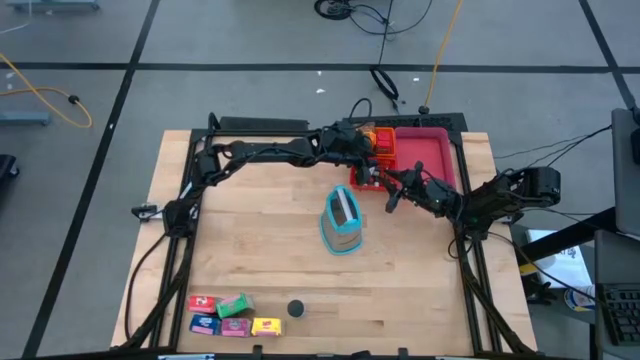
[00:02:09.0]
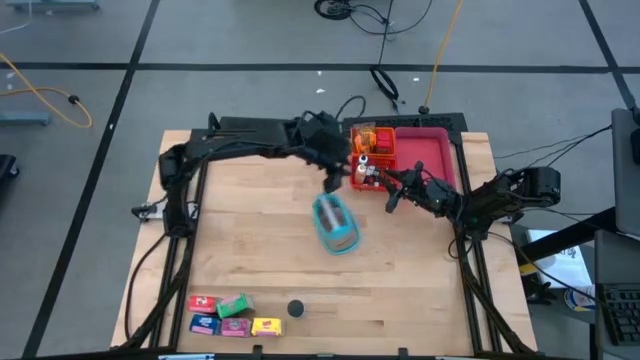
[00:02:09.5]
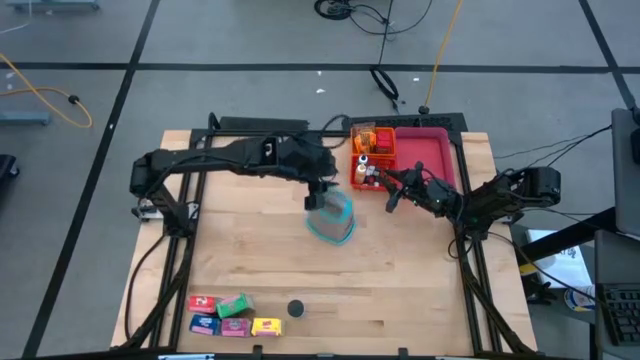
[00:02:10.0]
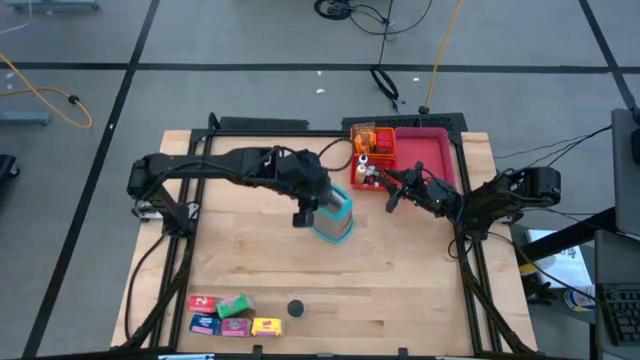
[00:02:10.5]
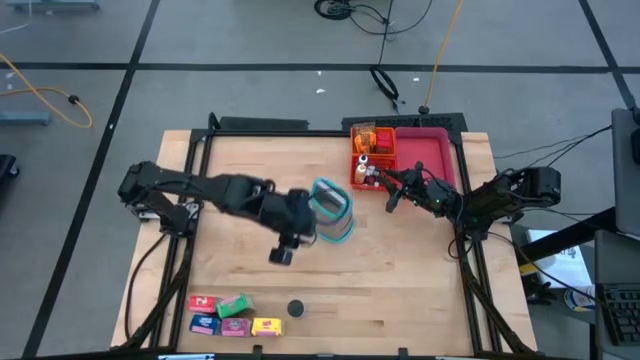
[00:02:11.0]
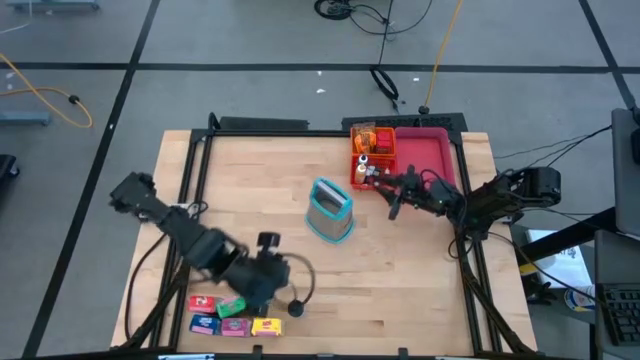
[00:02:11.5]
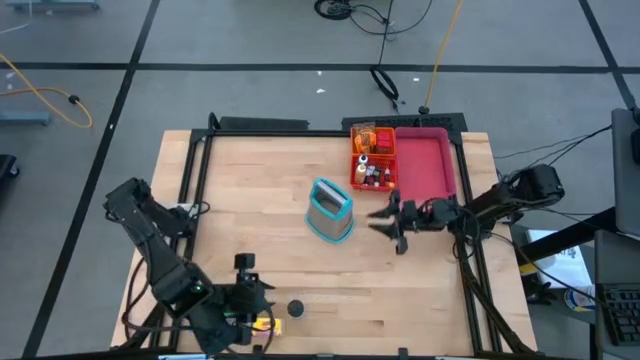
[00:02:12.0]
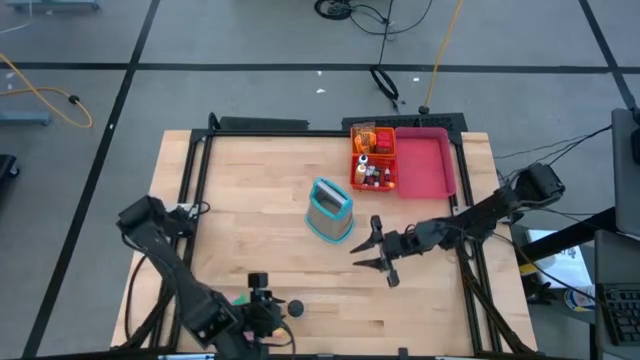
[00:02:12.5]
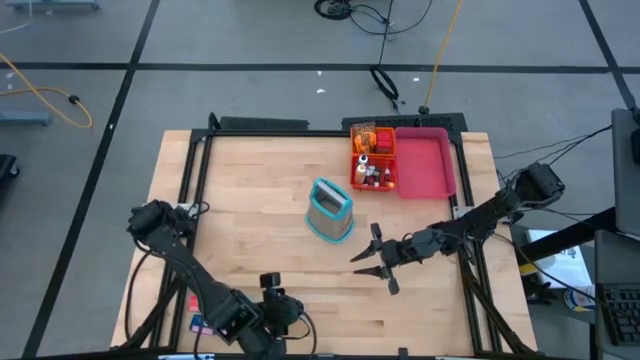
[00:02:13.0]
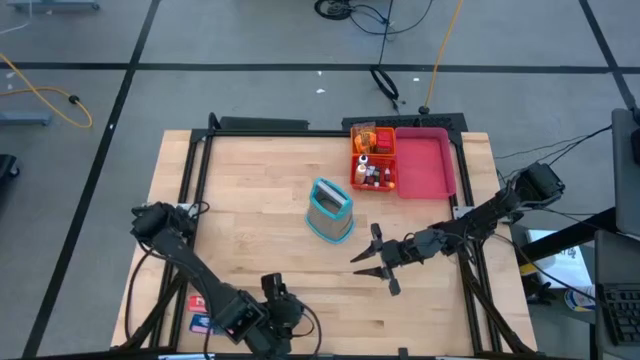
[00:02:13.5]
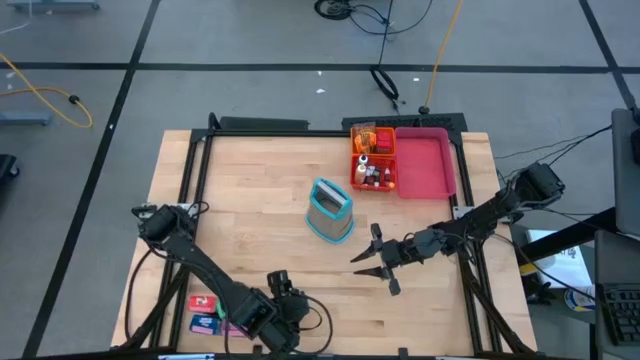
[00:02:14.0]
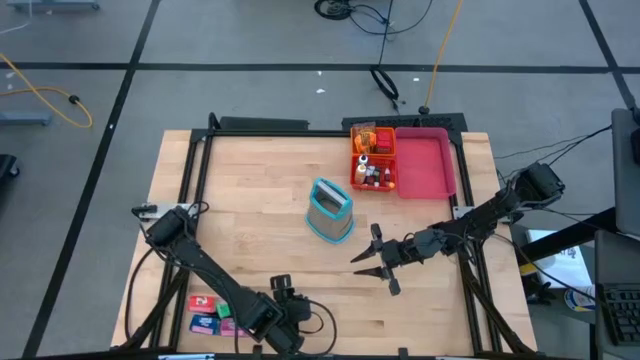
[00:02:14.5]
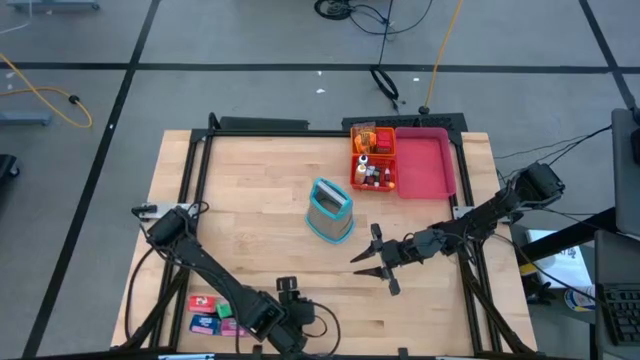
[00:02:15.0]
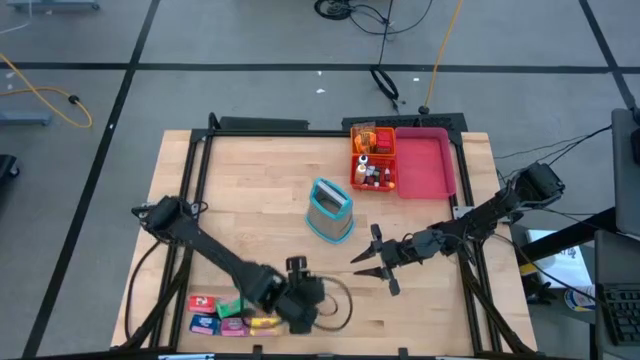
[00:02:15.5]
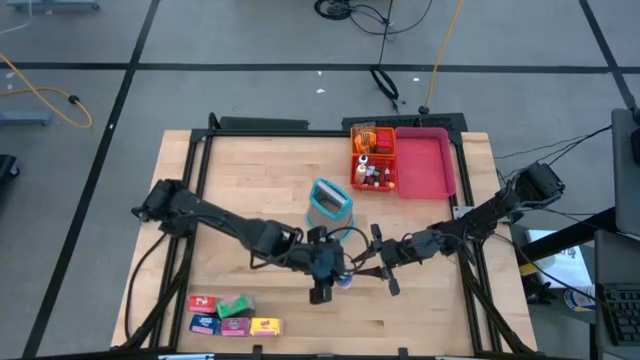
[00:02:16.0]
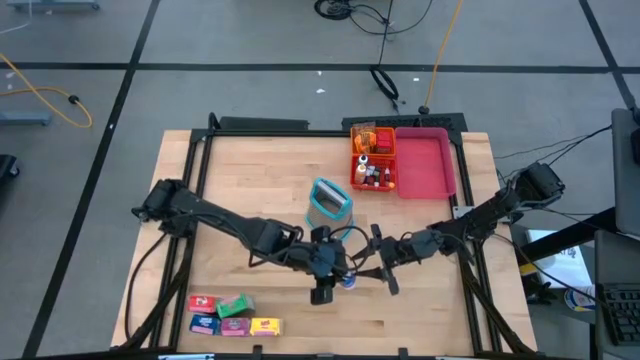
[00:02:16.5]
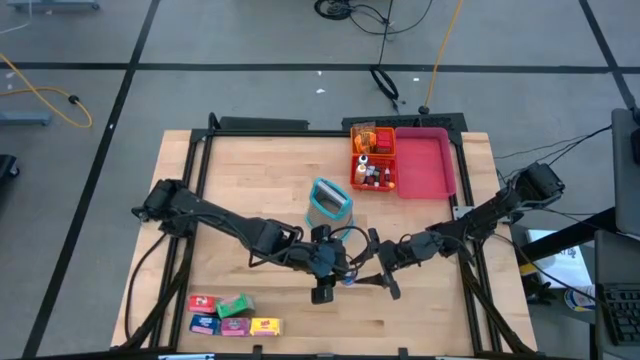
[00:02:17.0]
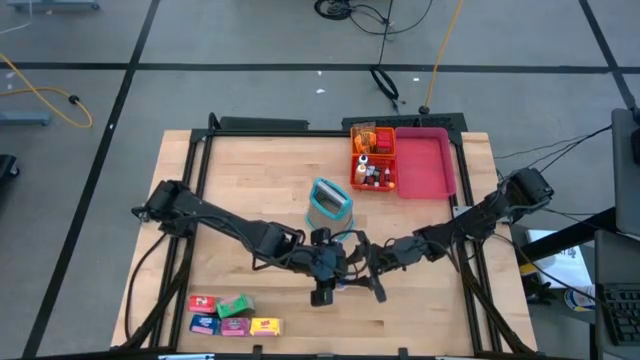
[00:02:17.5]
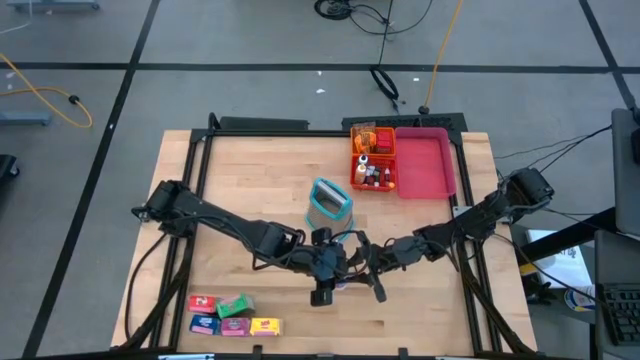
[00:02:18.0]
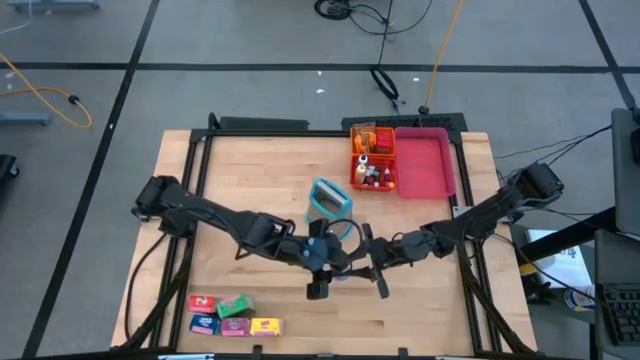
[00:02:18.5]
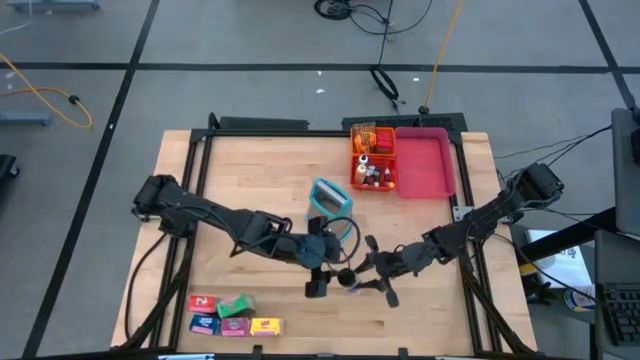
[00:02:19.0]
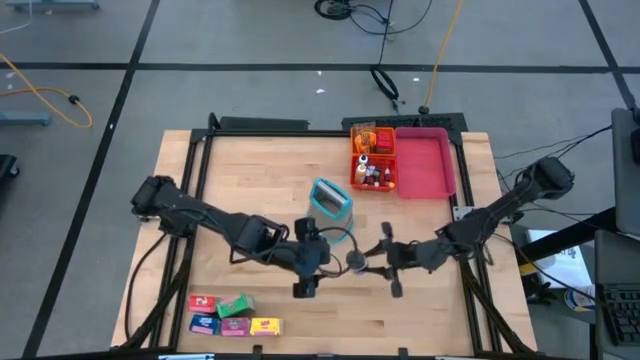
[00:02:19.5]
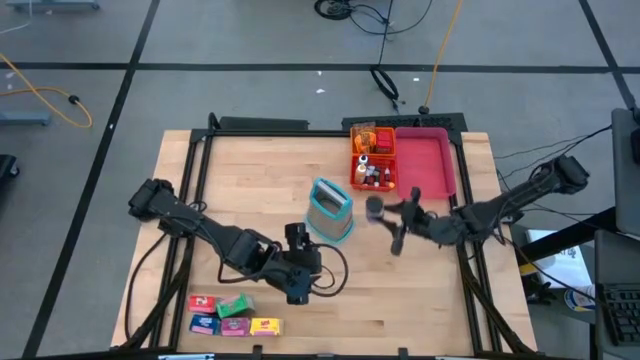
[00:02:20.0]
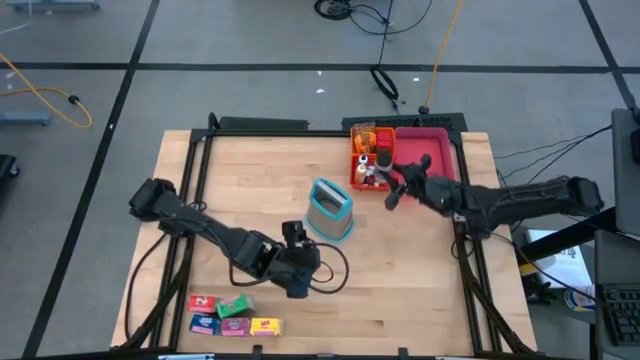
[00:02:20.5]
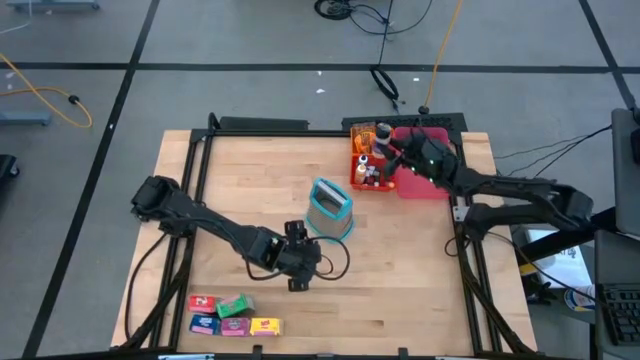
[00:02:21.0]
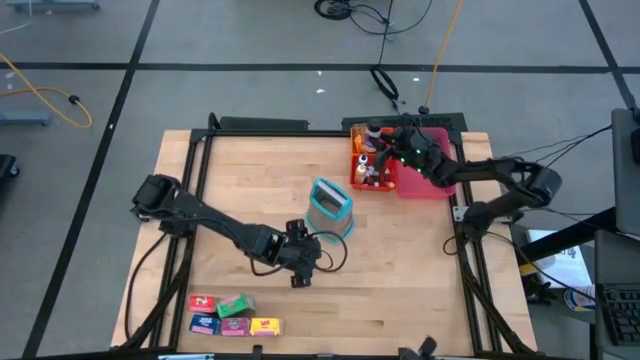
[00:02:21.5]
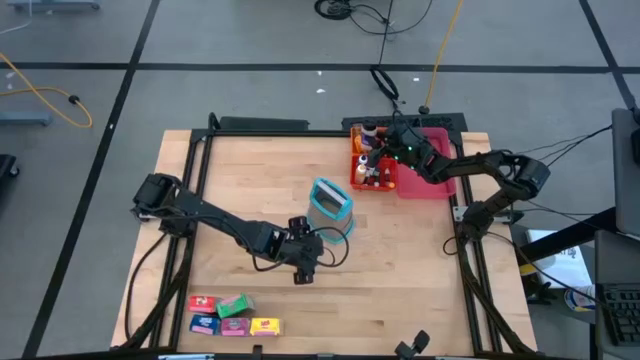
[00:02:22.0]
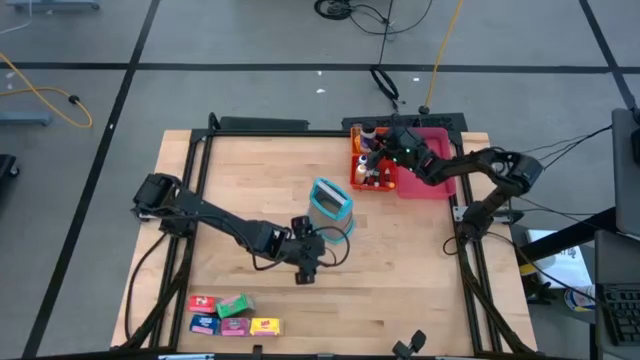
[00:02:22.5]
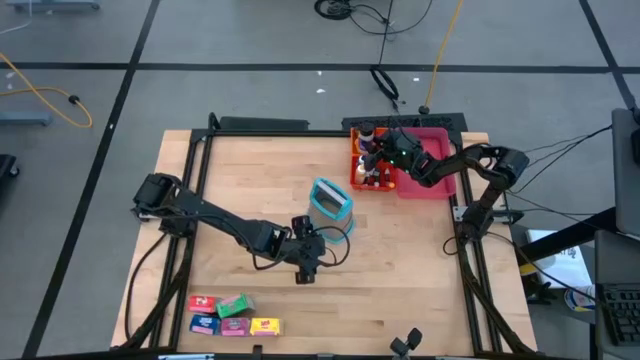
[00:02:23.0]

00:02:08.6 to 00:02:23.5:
Task: Pick & Place Kitchen Items
Put the purple seasoning bottle into the orange bin
